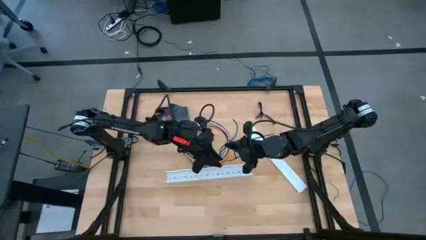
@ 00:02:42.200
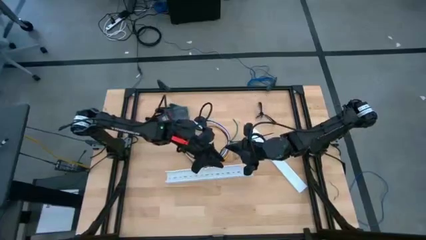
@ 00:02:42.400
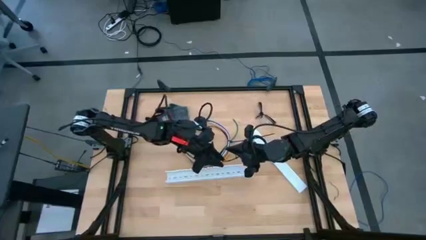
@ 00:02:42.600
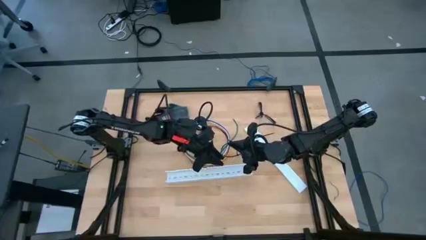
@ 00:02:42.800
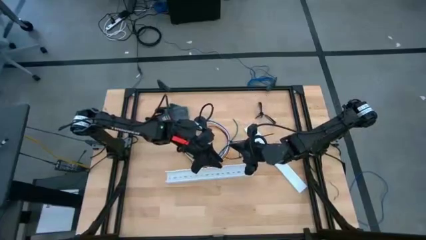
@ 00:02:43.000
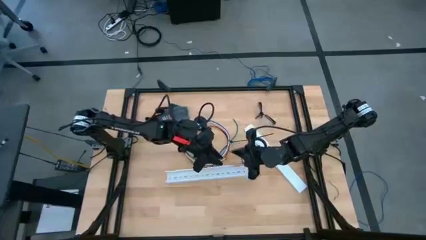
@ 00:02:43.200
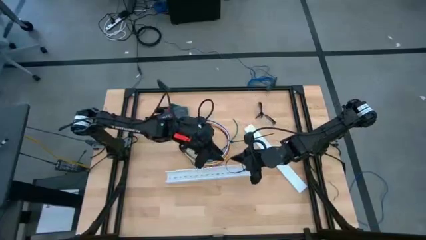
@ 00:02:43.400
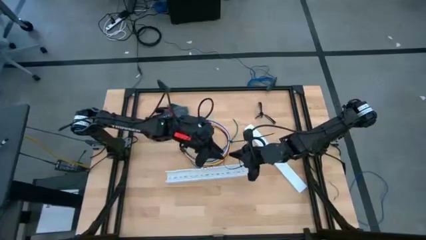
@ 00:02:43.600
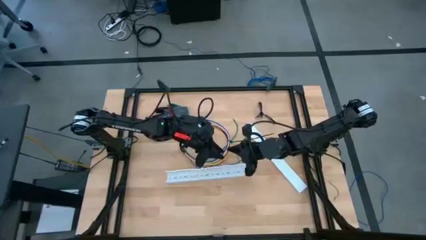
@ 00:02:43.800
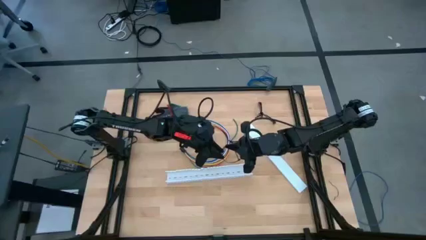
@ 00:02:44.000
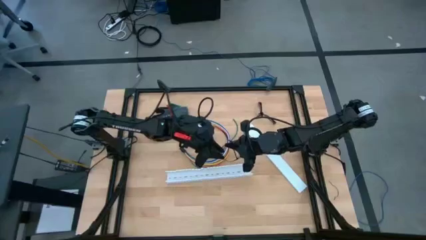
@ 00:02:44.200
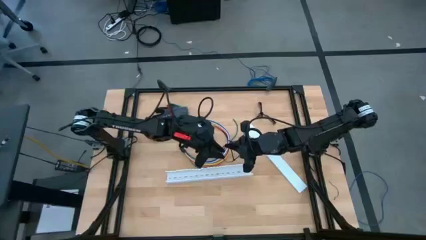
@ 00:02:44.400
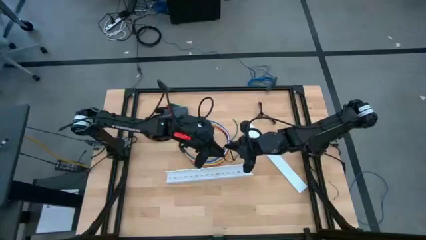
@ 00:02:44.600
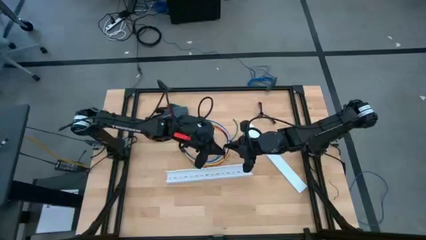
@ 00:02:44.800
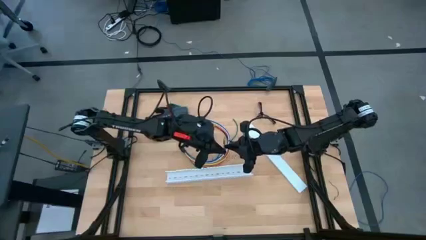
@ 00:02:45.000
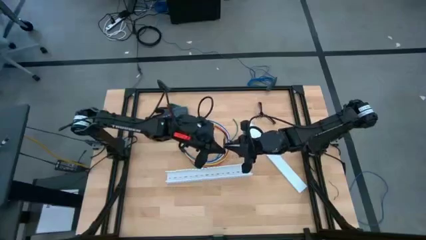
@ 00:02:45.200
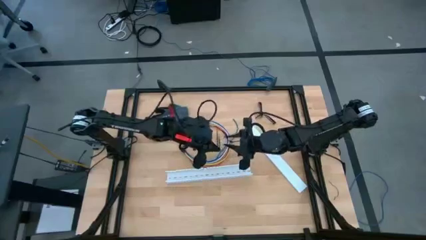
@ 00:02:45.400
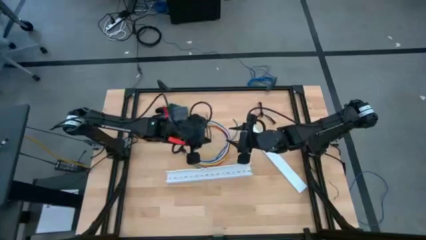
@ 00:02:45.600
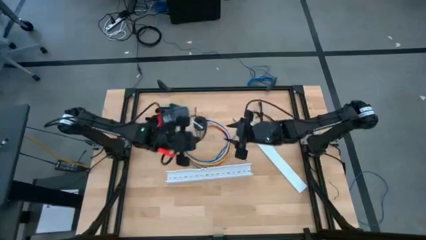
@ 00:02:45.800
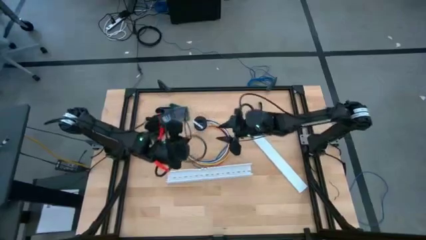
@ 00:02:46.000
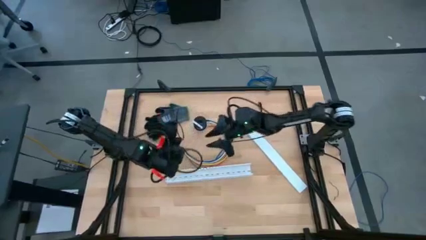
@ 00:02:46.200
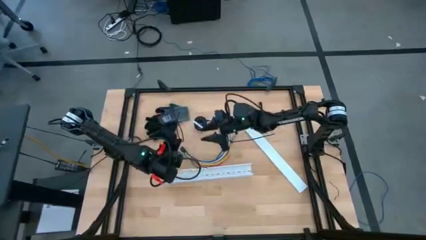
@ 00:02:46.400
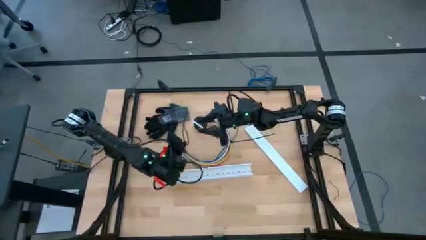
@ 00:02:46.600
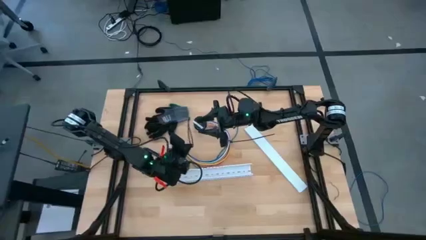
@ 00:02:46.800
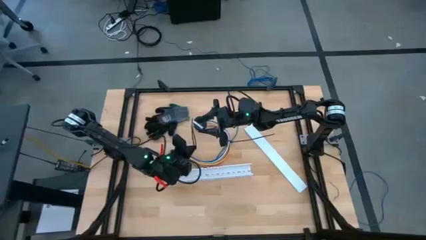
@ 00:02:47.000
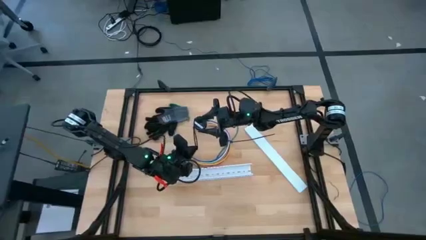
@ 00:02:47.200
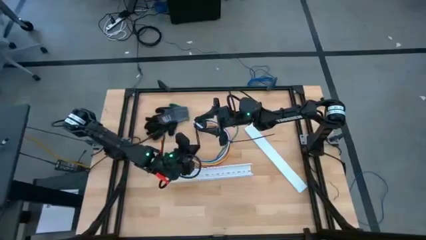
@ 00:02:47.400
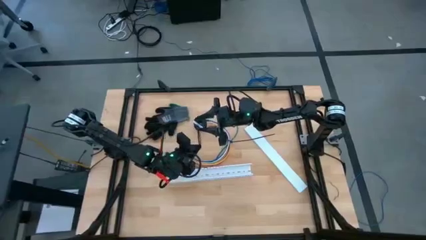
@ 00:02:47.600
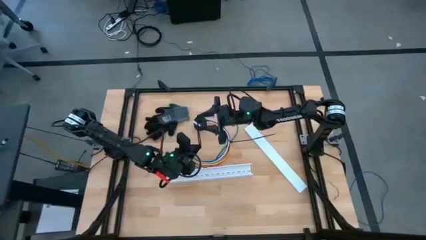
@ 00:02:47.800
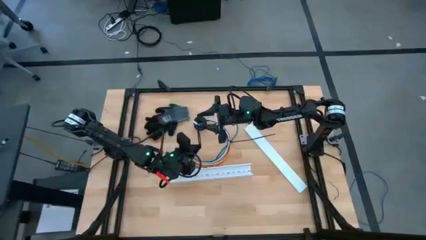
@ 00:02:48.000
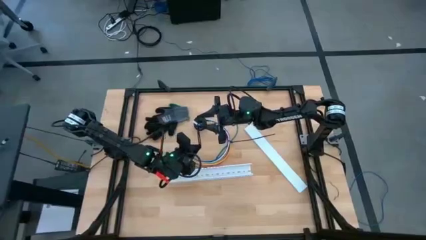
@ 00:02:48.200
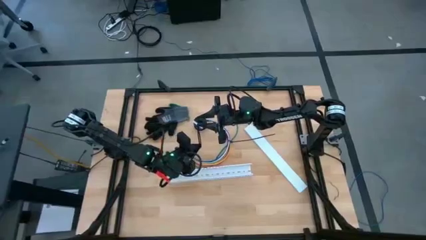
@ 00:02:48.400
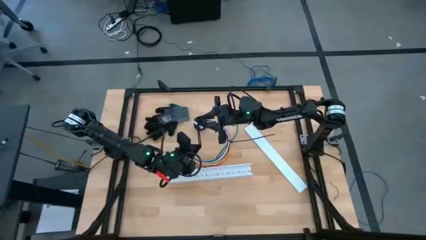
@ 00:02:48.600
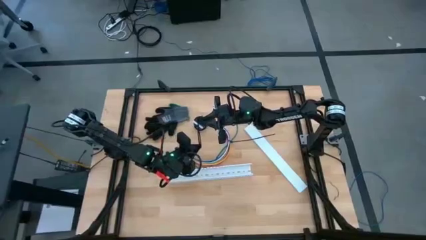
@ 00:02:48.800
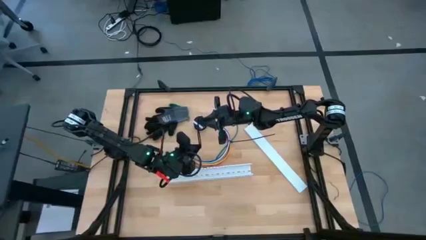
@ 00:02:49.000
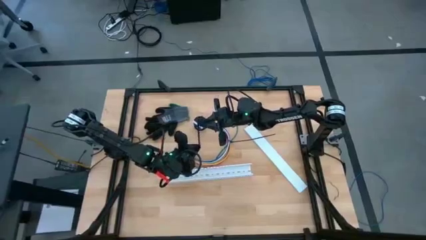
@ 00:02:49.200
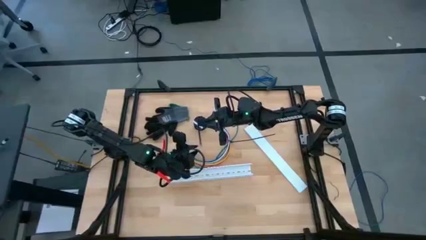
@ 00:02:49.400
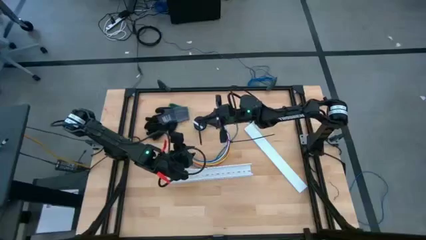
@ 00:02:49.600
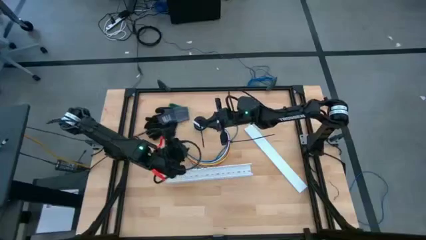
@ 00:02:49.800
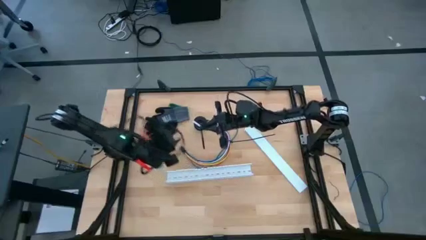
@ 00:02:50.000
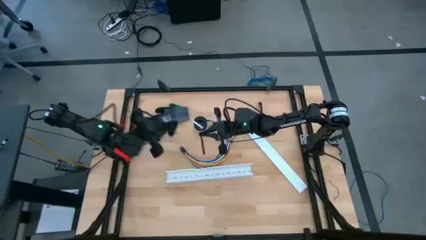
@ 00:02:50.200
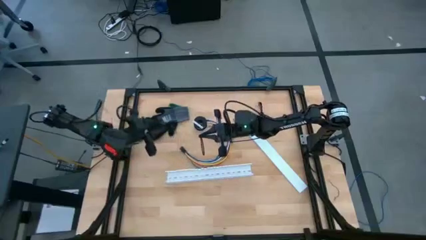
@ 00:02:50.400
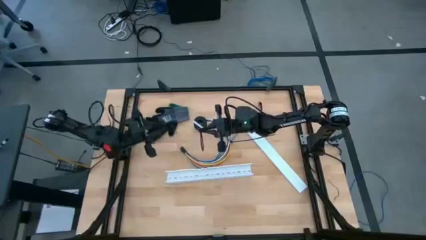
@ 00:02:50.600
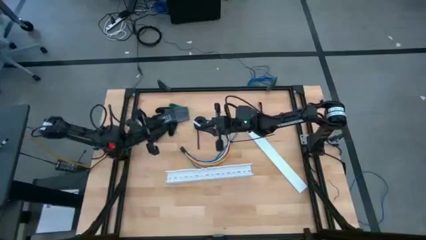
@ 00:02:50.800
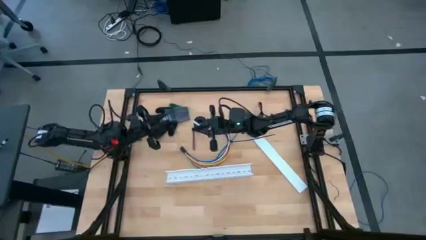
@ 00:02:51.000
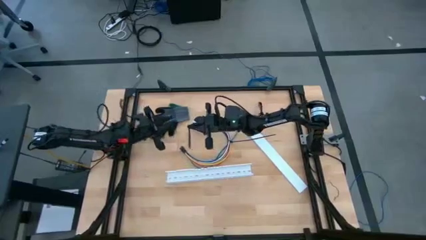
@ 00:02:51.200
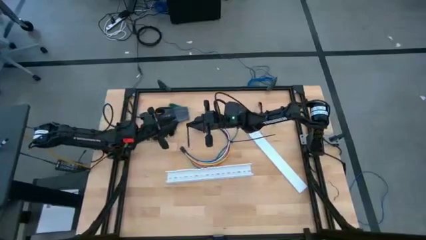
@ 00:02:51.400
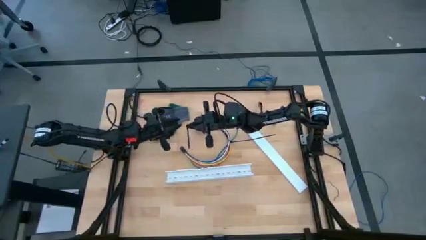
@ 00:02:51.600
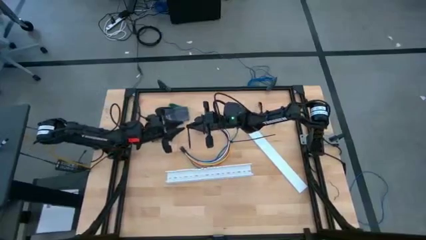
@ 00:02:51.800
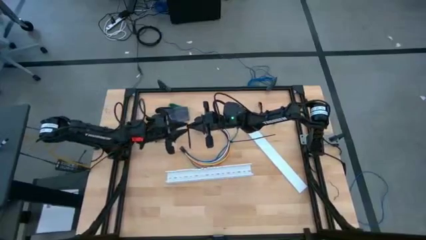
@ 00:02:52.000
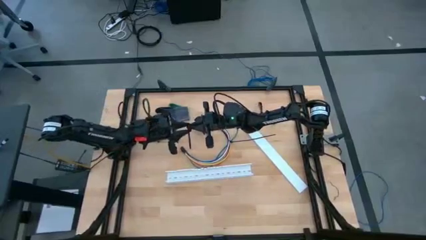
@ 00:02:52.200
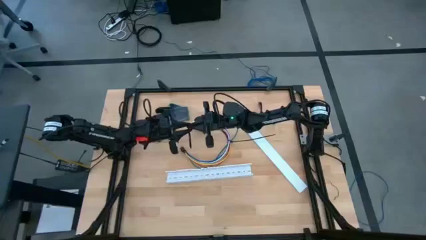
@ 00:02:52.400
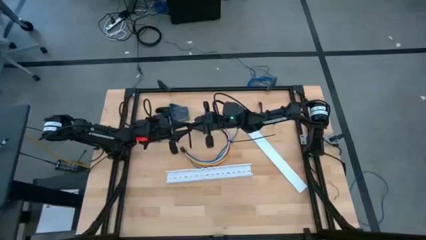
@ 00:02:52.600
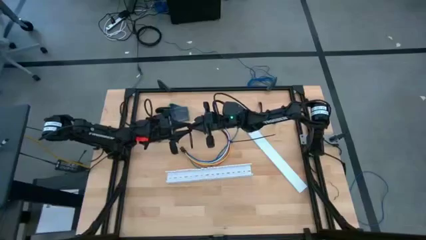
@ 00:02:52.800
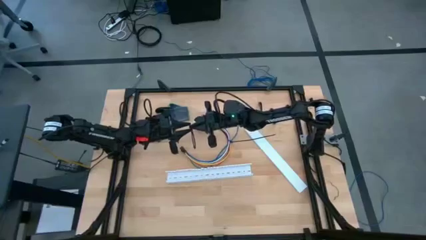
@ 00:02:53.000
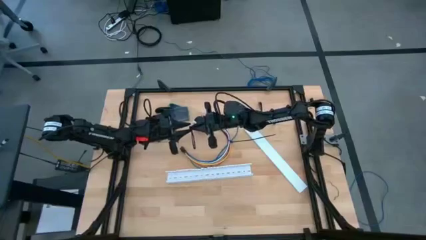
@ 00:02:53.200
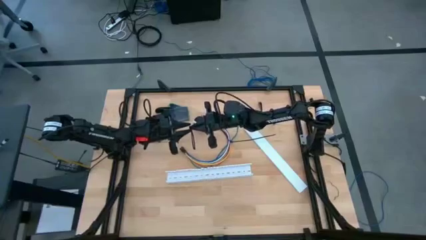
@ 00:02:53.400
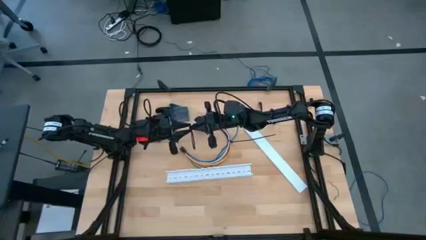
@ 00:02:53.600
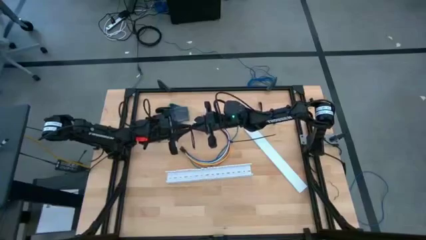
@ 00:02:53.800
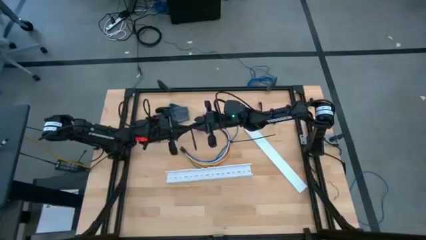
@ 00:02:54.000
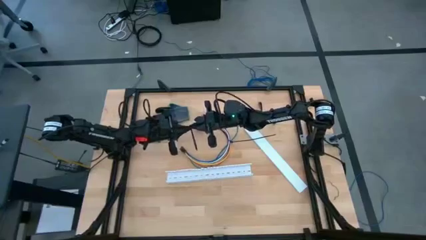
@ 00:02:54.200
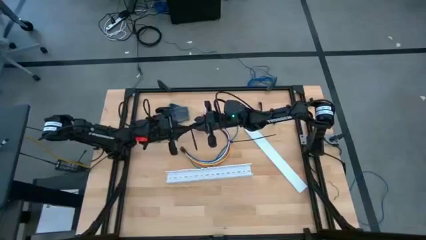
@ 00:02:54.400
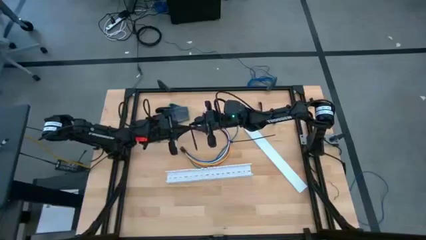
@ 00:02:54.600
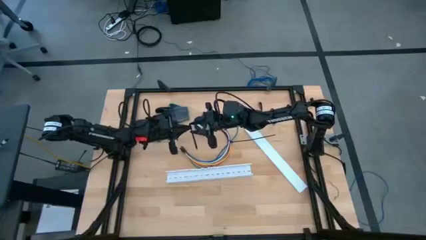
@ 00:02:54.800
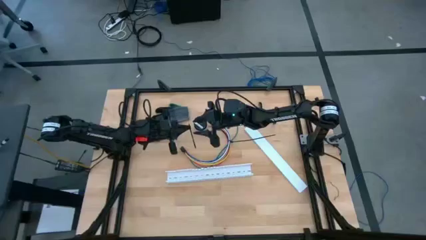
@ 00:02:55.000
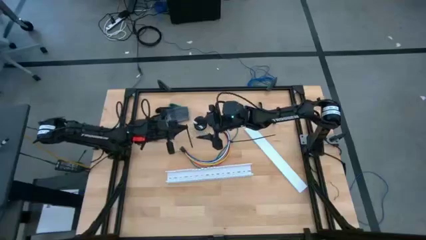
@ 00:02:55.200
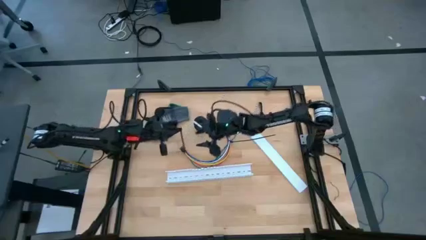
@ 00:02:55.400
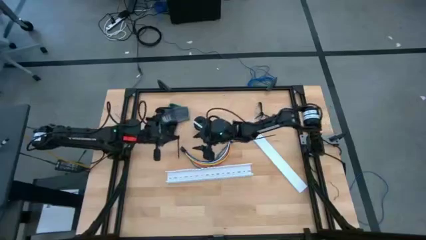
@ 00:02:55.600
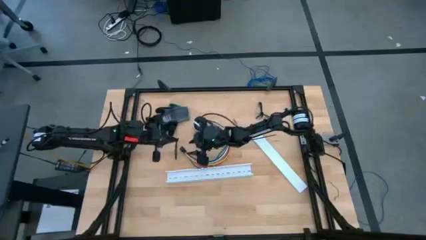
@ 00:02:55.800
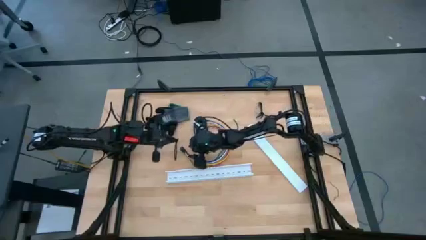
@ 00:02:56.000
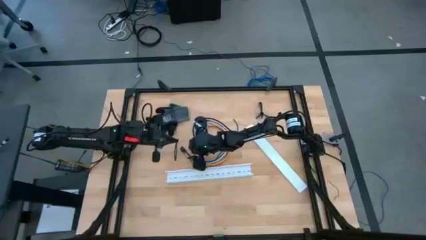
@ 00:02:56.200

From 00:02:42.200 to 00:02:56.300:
Task: Ziptie cables
Wrap the cable wires with the black zip tie
